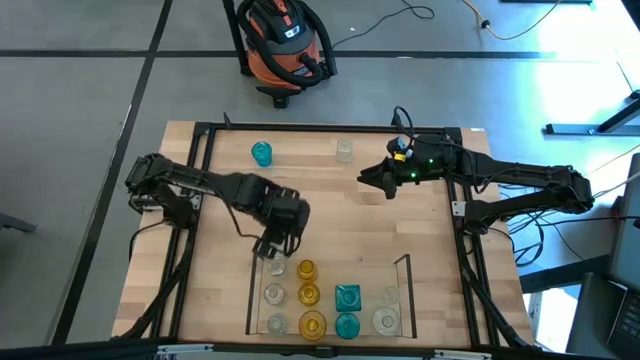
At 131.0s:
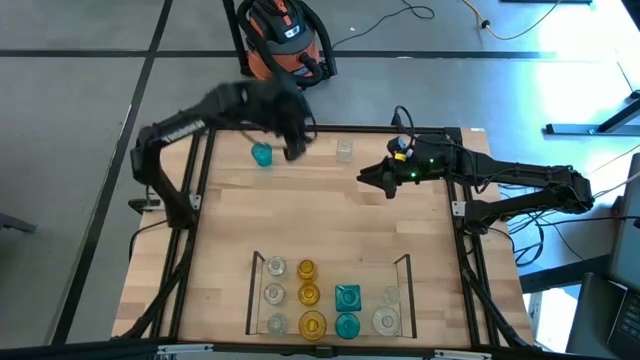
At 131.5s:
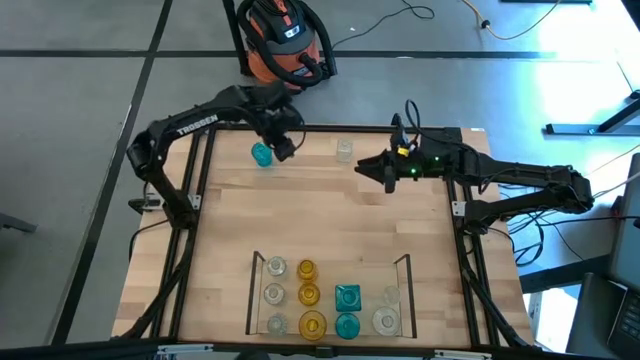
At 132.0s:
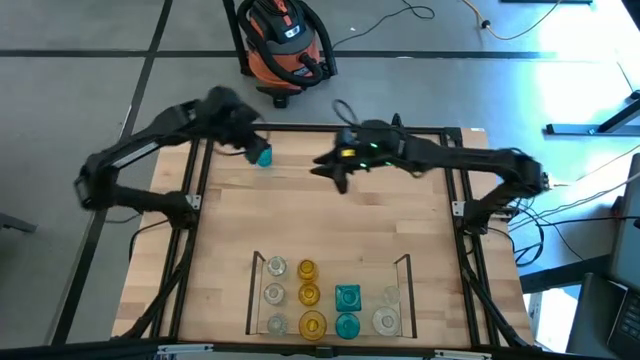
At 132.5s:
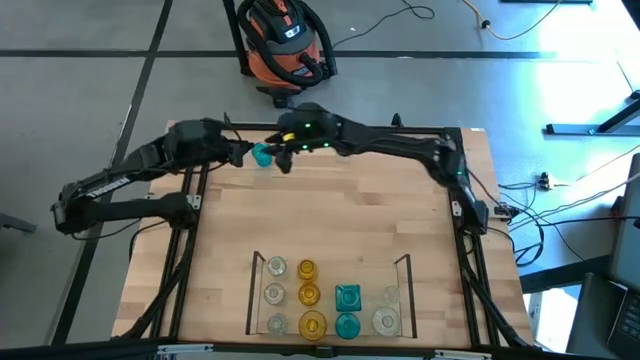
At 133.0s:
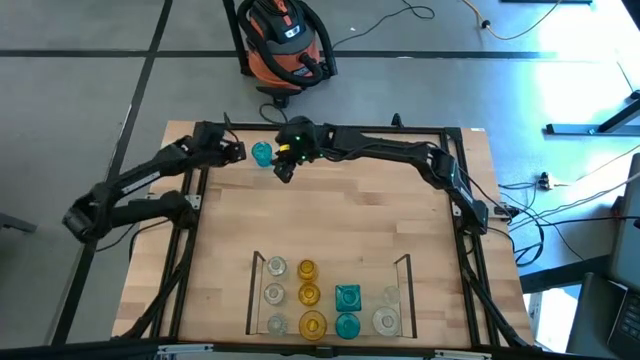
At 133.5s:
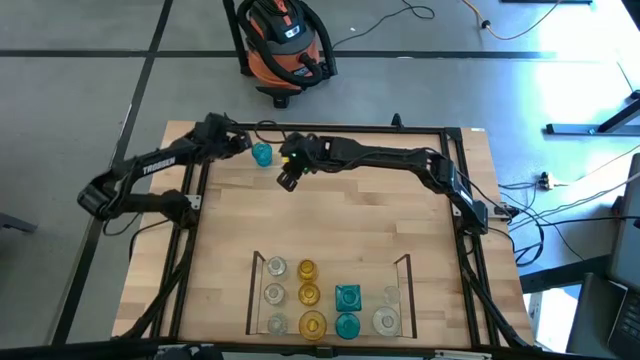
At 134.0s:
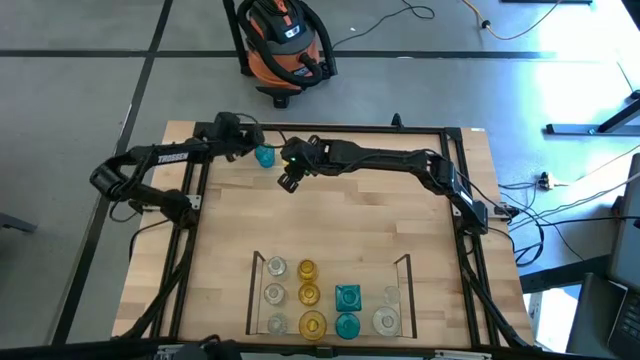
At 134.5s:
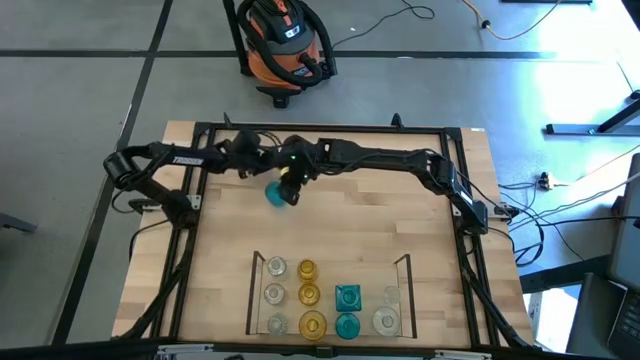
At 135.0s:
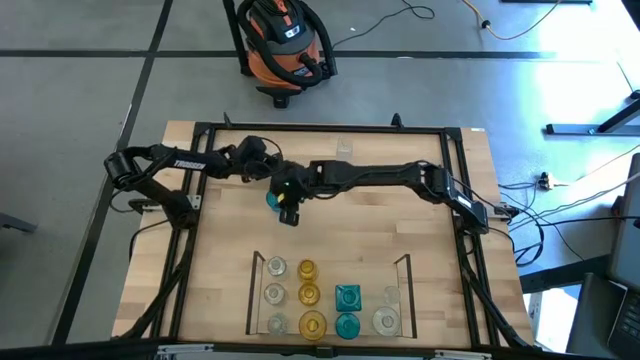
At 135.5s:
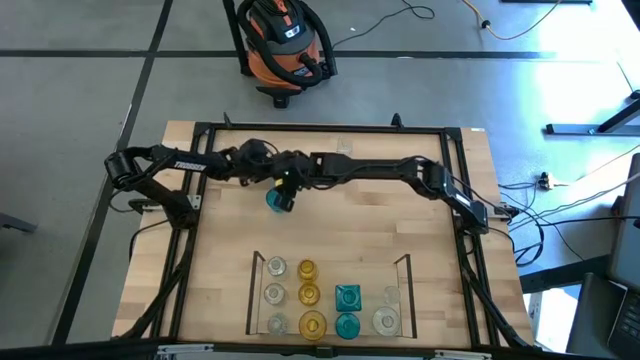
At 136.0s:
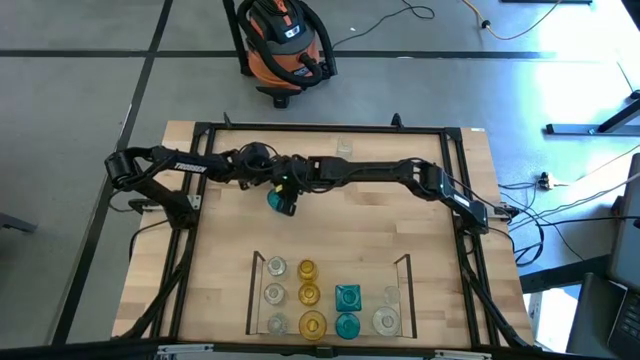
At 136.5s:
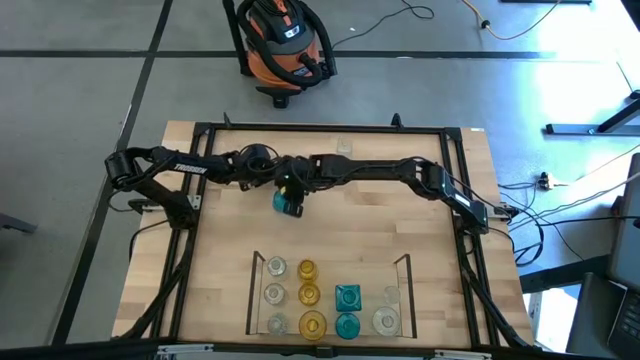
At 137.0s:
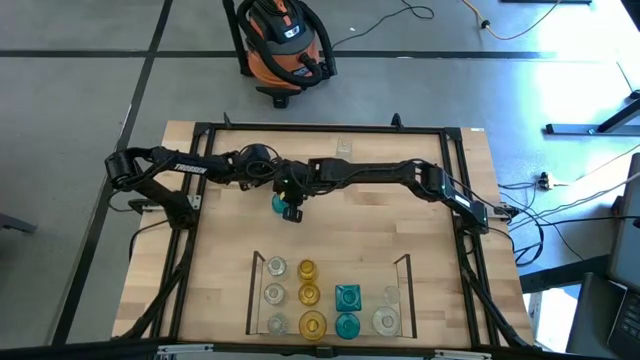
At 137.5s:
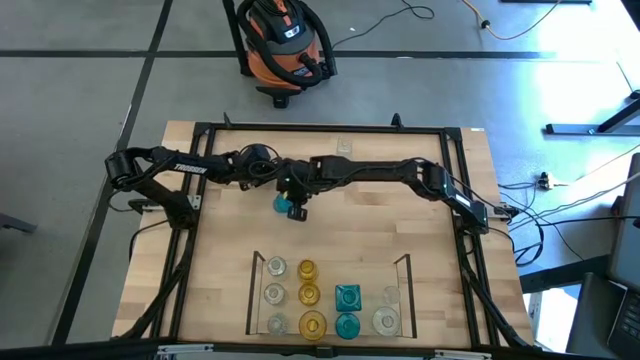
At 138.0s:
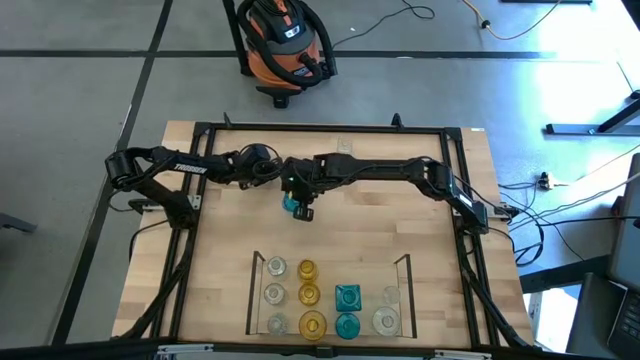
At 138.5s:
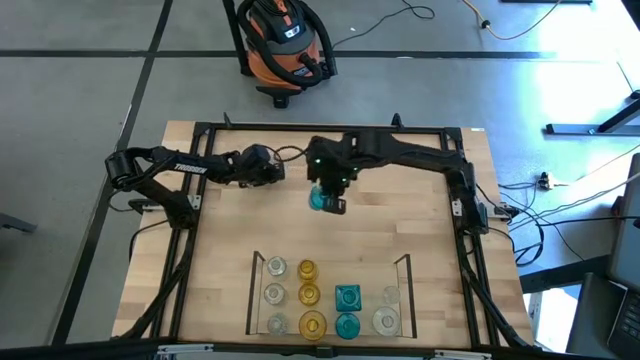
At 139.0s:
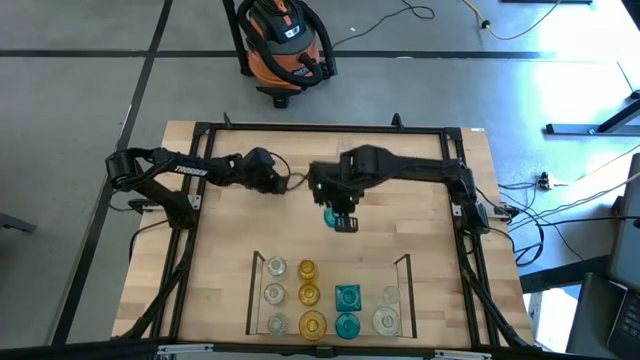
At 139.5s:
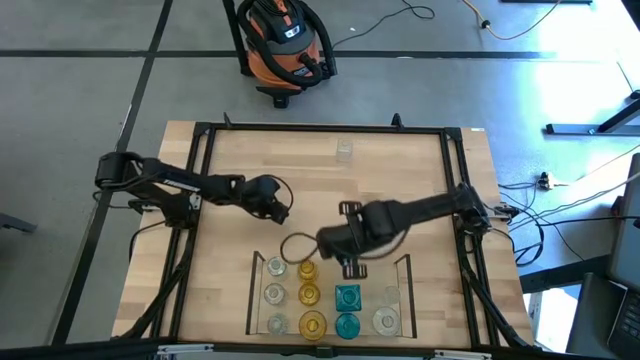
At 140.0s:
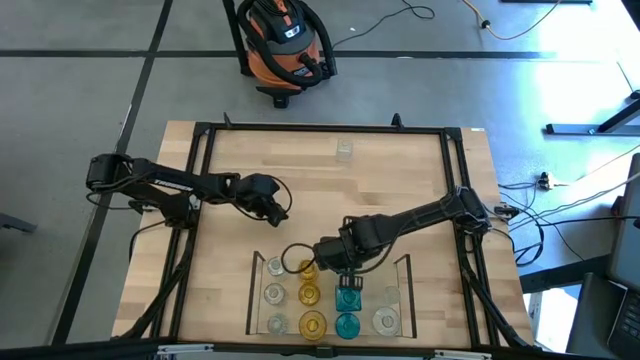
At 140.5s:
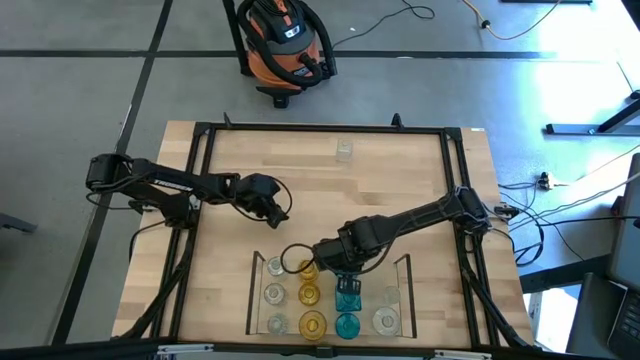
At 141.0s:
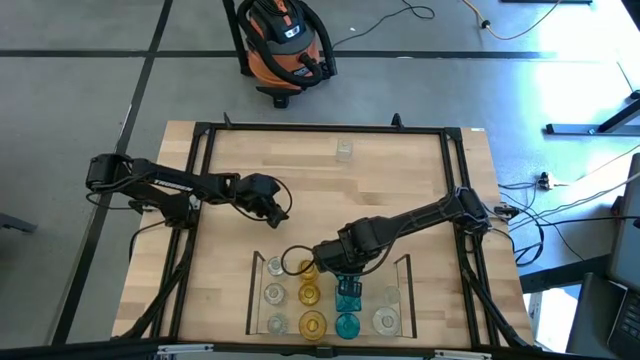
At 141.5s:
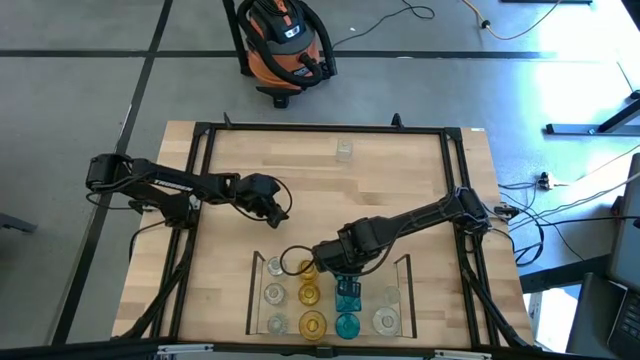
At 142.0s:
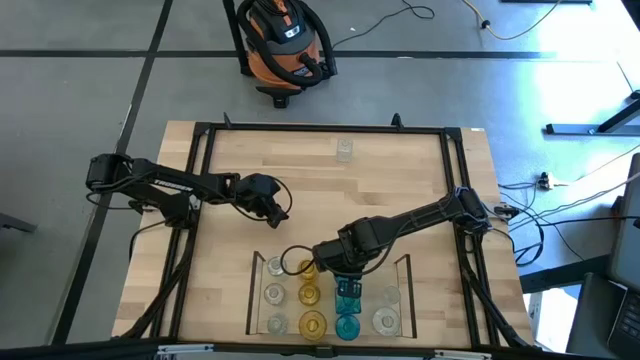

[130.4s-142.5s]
Task: sort vases onto shelf
Put the blue vase on the shelf aligned with the other blue vase

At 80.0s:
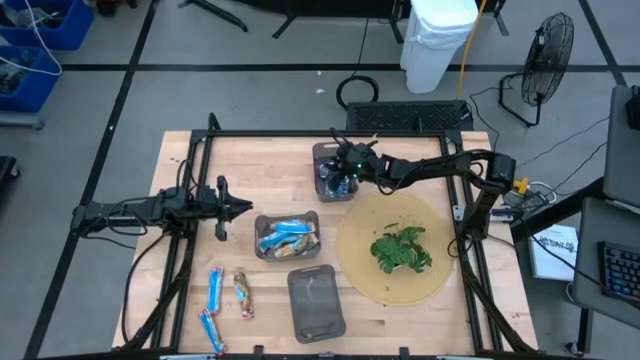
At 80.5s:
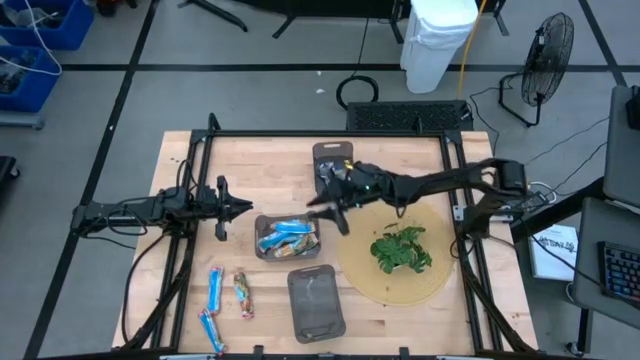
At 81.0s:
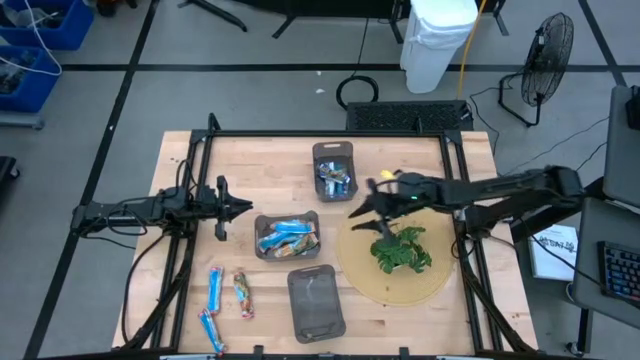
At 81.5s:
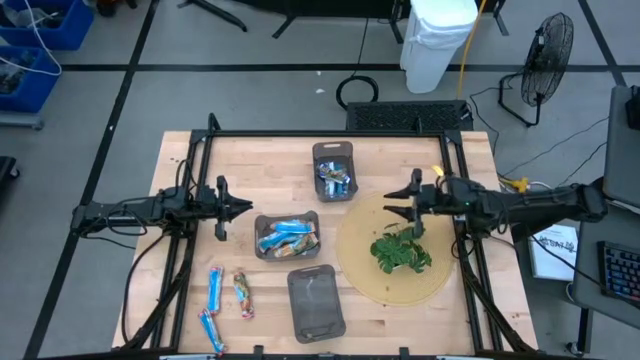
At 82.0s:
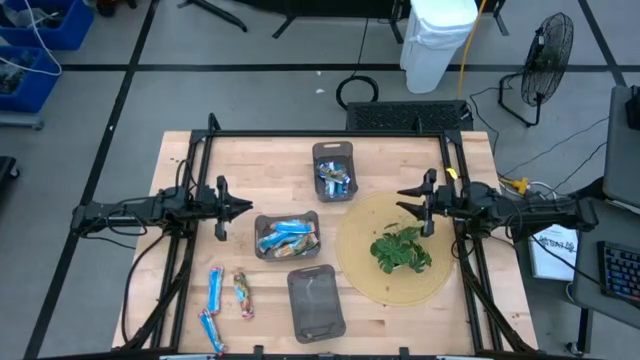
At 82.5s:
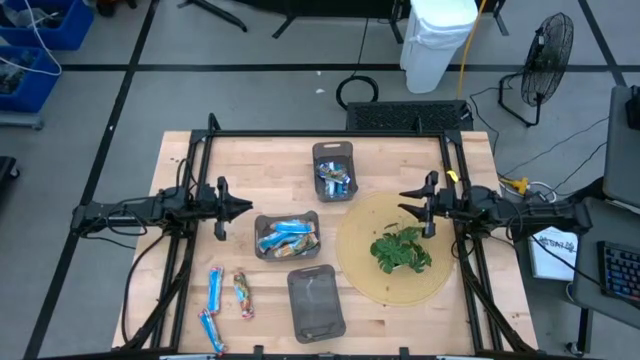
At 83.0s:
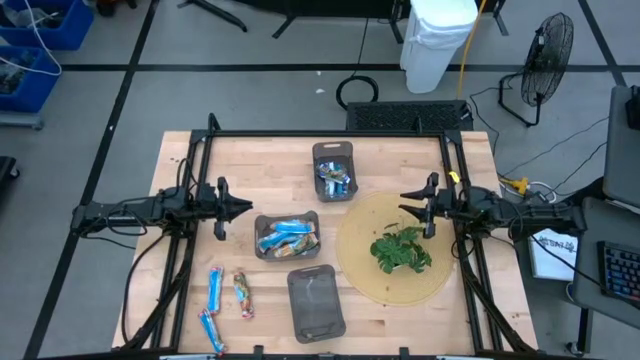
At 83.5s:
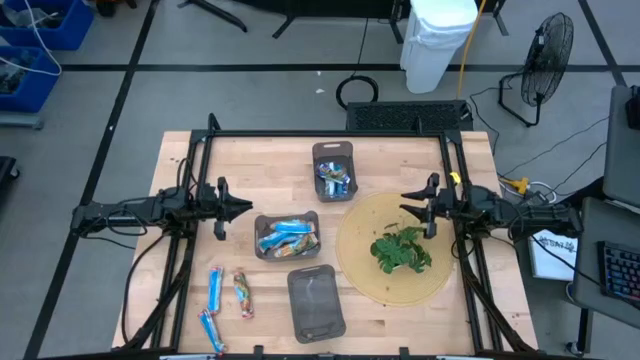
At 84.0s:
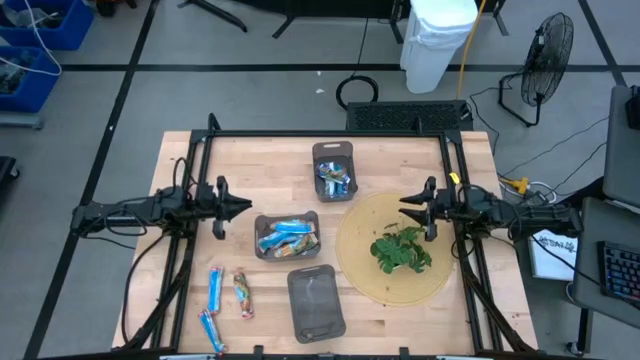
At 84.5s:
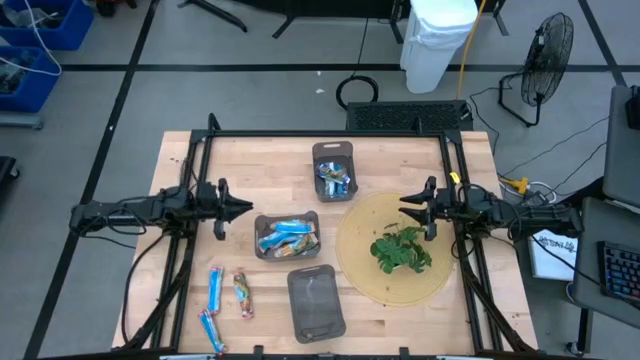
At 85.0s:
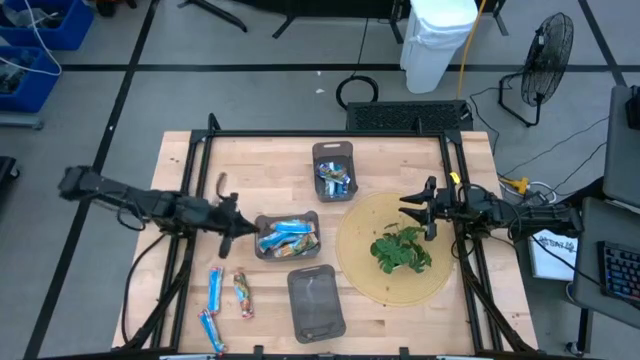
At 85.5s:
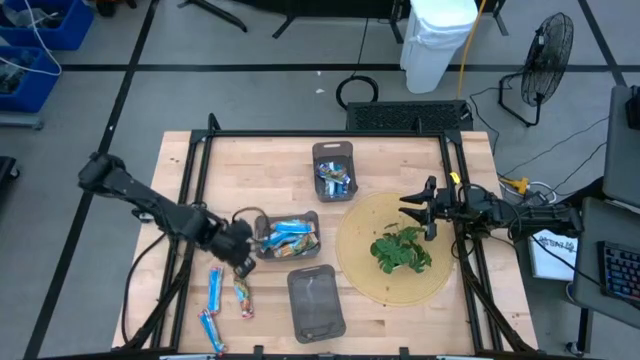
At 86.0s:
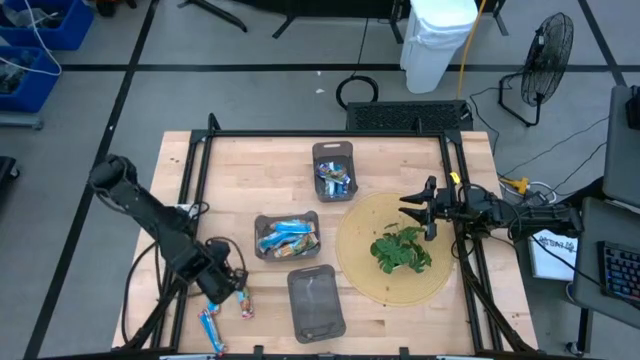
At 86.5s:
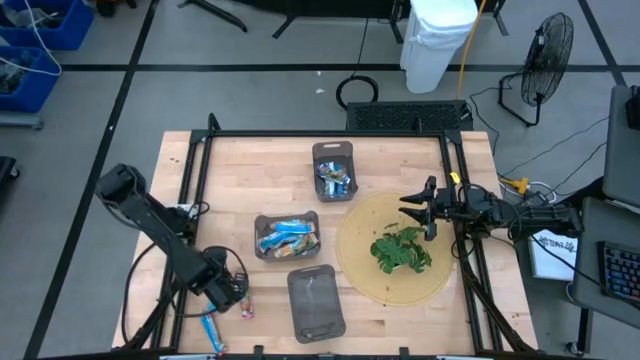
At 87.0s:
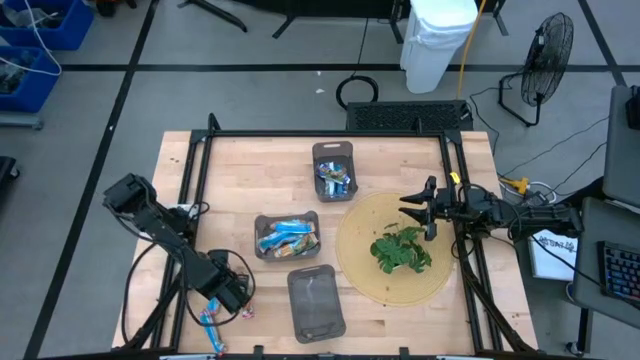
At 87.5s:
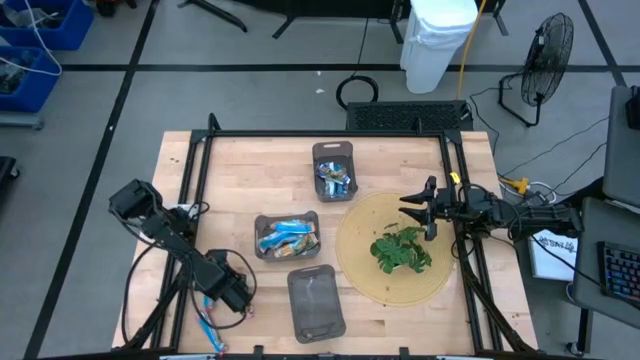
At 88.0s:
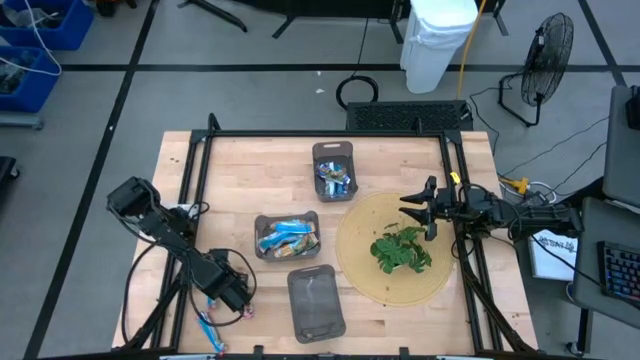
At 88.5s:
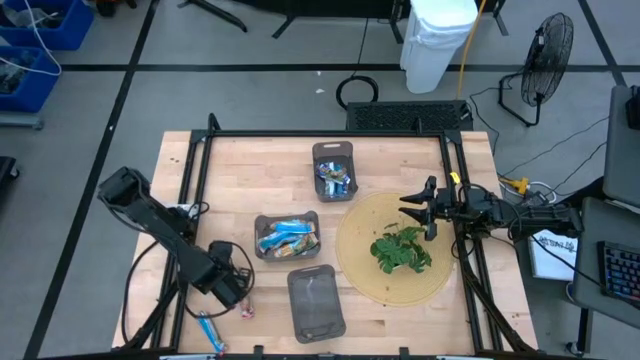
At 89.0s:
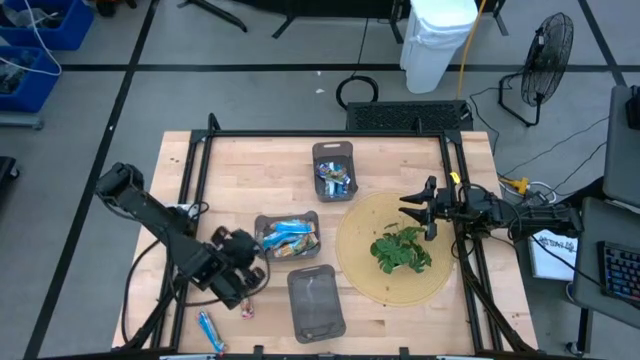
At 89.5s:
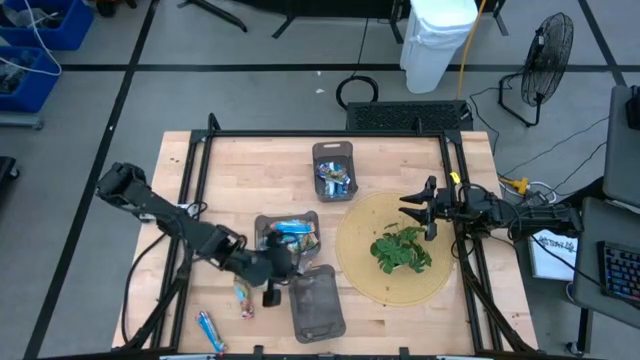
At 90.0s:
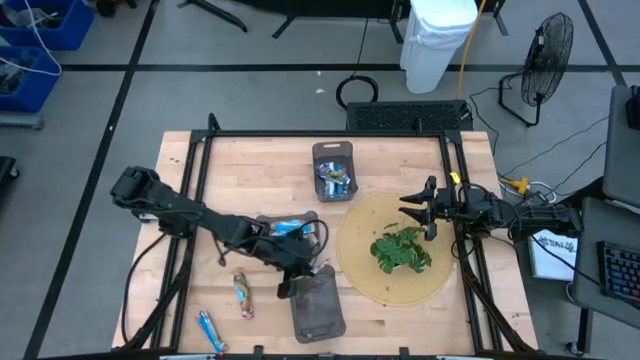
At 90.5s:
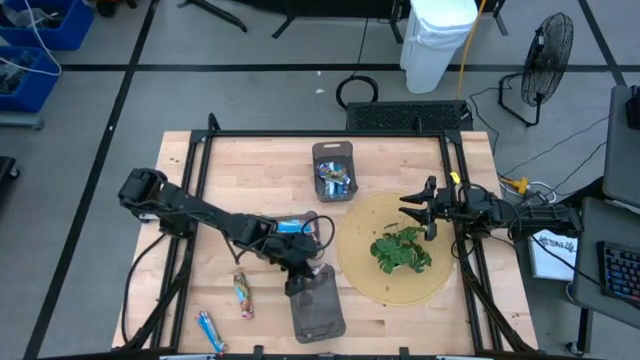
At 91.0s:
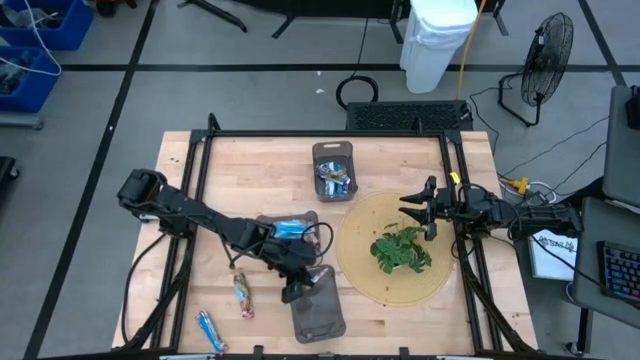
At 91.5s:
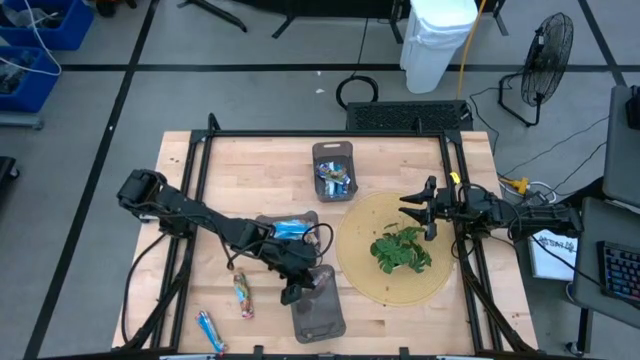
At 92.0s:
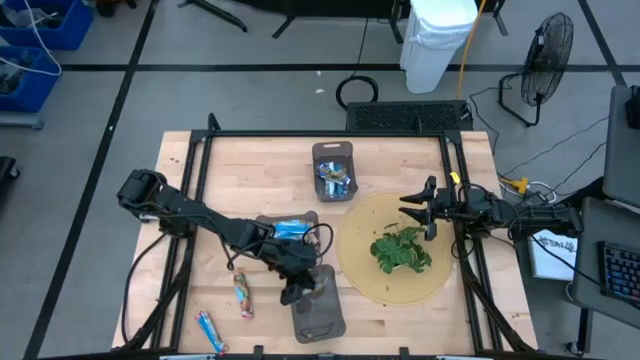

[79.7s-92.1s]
Task: Pick and place Granola Bars by type
Put the red granola bar into the bottom black bin
